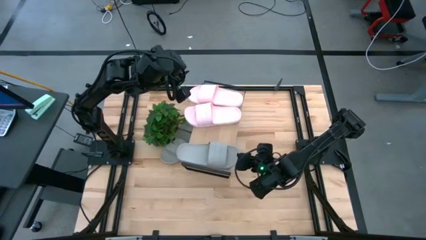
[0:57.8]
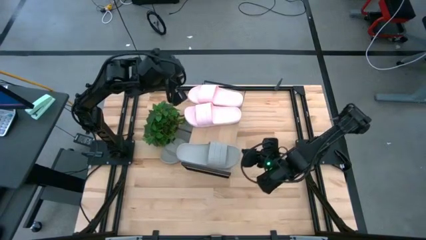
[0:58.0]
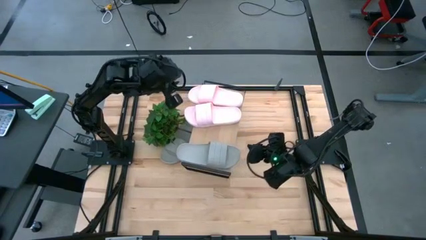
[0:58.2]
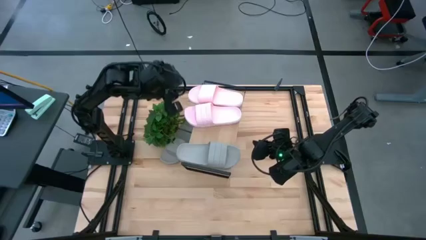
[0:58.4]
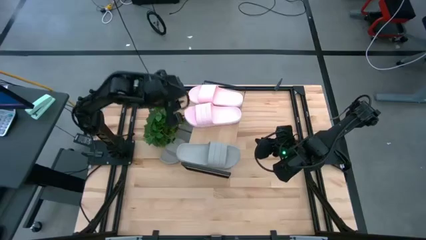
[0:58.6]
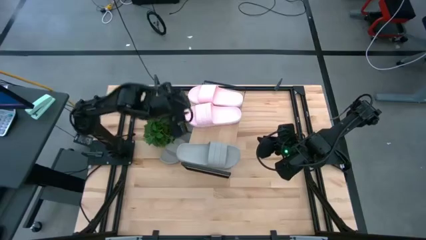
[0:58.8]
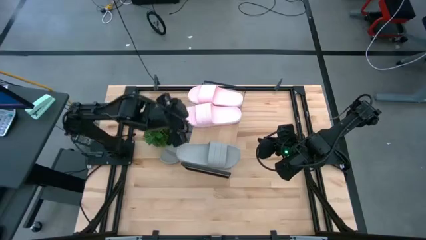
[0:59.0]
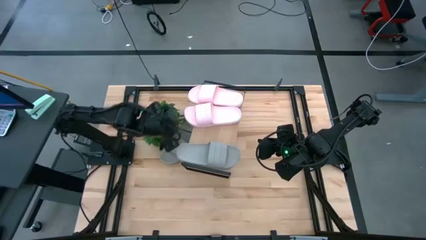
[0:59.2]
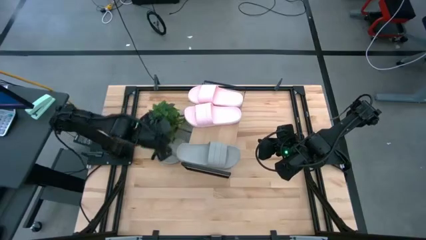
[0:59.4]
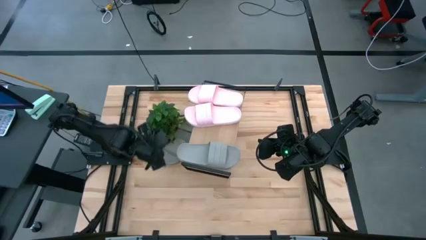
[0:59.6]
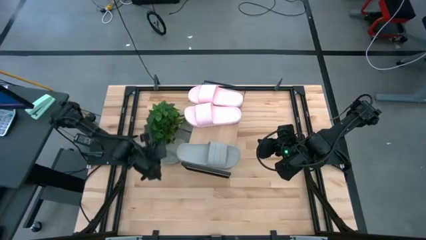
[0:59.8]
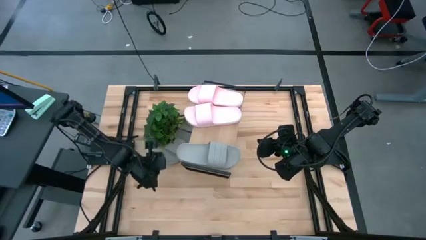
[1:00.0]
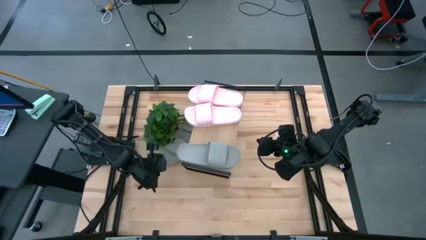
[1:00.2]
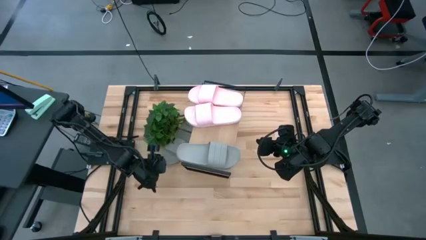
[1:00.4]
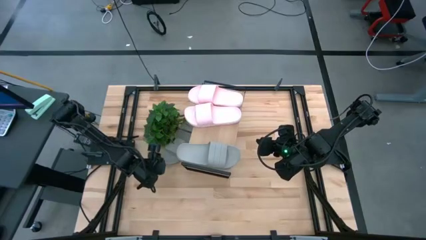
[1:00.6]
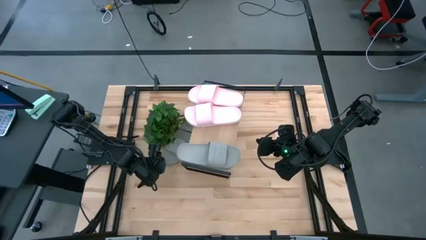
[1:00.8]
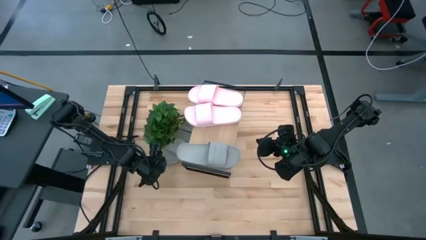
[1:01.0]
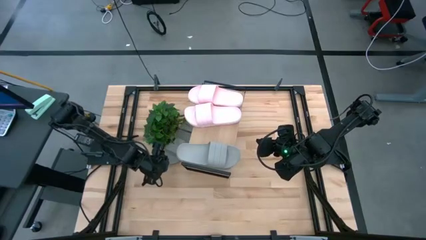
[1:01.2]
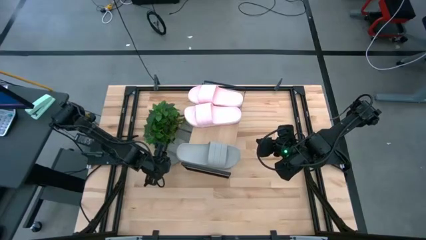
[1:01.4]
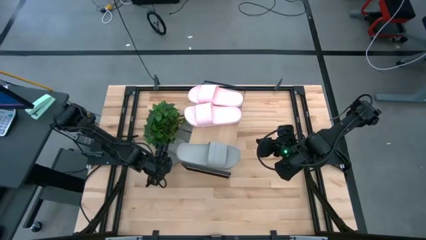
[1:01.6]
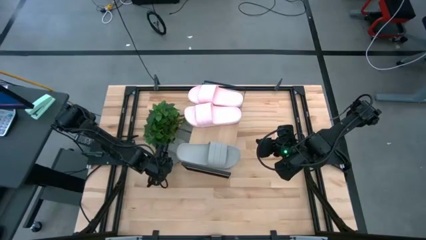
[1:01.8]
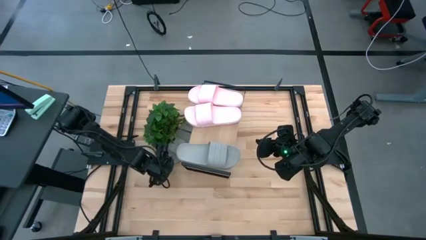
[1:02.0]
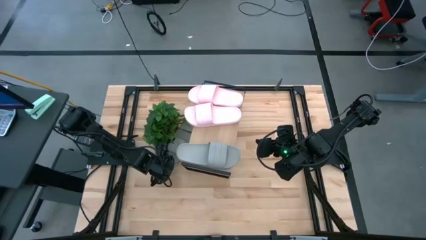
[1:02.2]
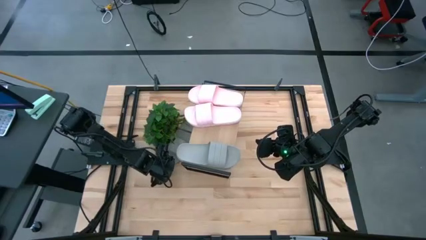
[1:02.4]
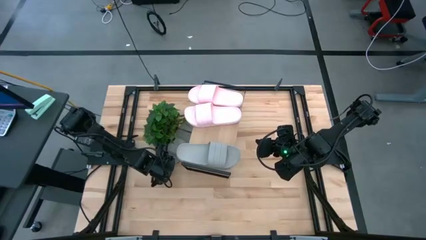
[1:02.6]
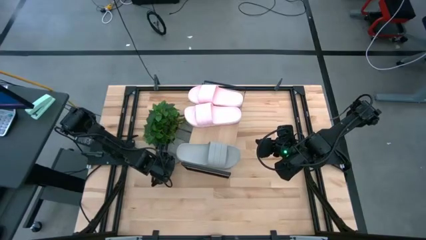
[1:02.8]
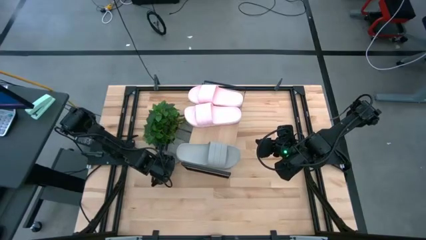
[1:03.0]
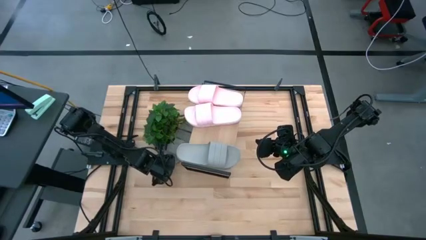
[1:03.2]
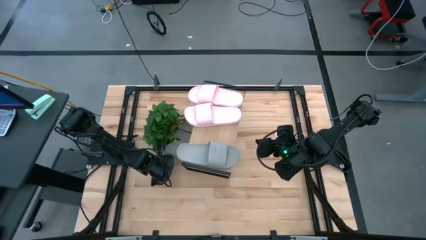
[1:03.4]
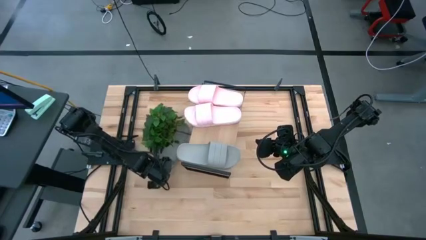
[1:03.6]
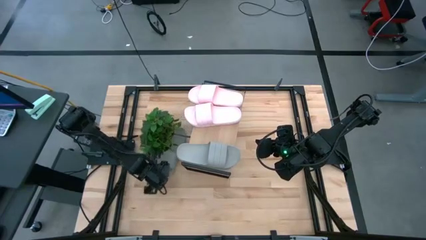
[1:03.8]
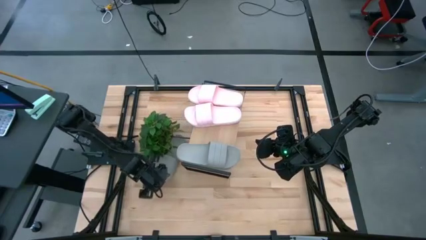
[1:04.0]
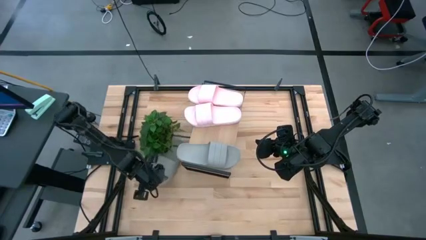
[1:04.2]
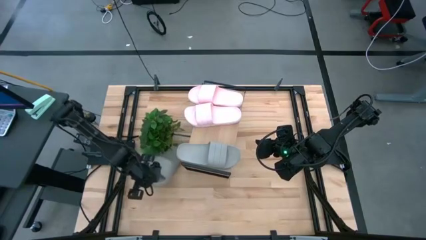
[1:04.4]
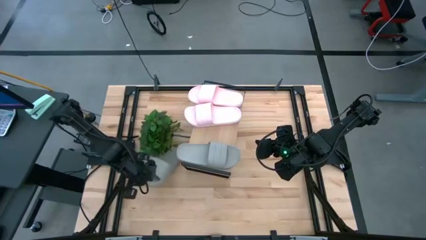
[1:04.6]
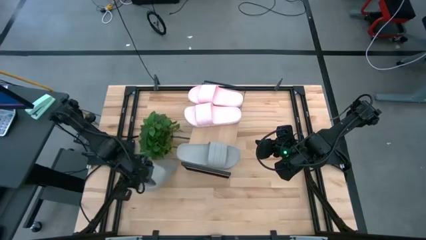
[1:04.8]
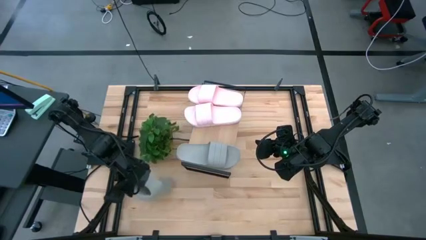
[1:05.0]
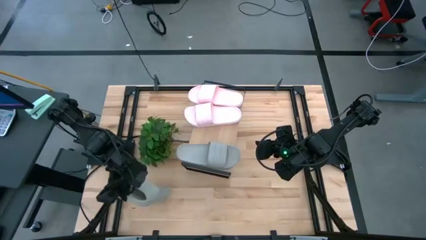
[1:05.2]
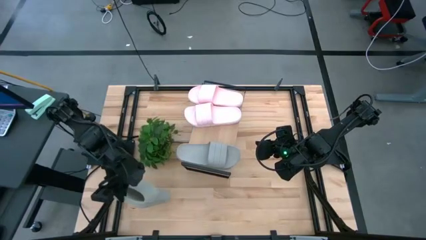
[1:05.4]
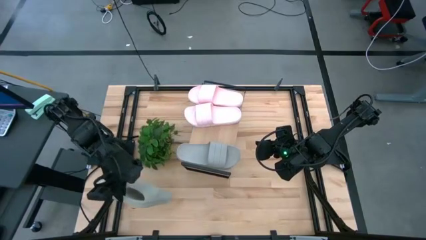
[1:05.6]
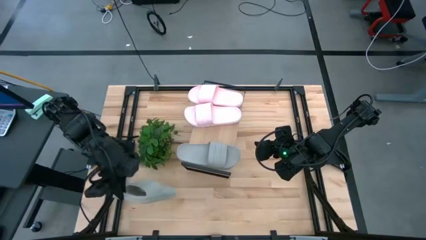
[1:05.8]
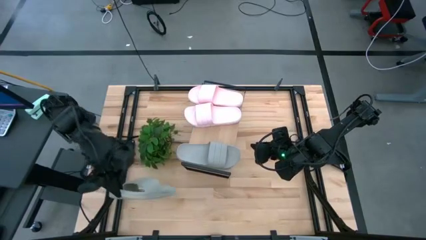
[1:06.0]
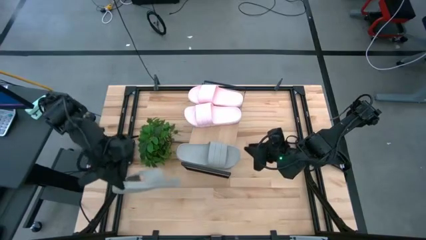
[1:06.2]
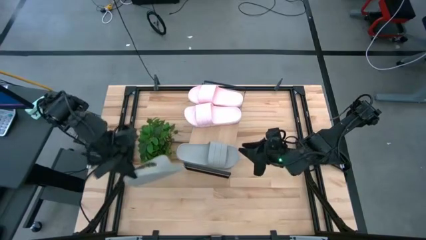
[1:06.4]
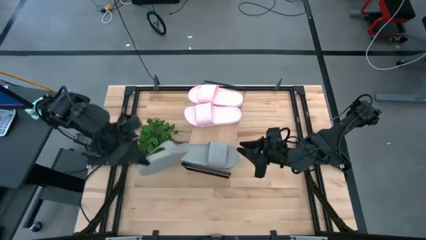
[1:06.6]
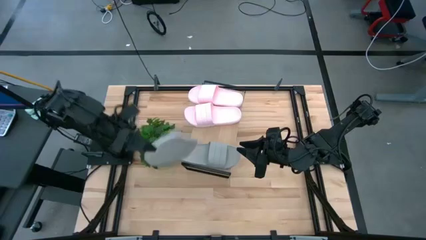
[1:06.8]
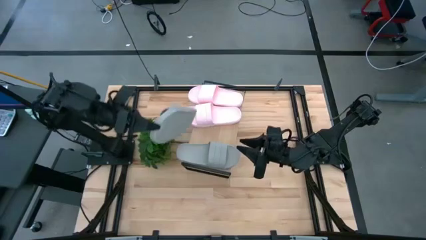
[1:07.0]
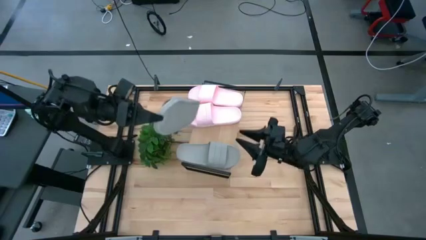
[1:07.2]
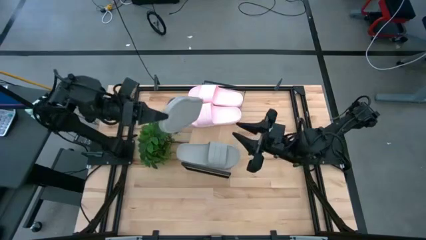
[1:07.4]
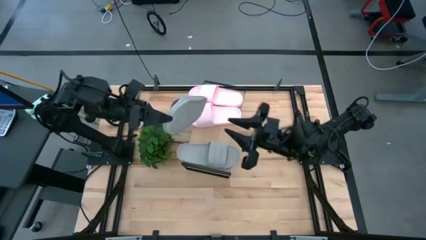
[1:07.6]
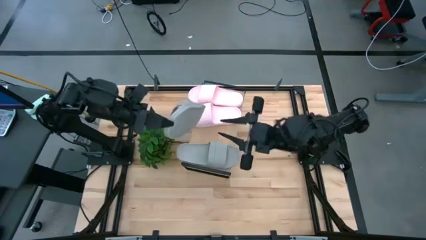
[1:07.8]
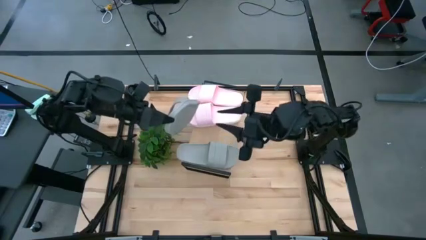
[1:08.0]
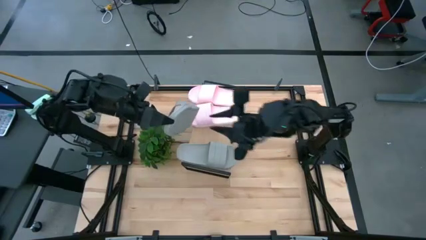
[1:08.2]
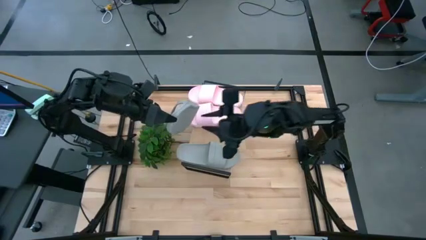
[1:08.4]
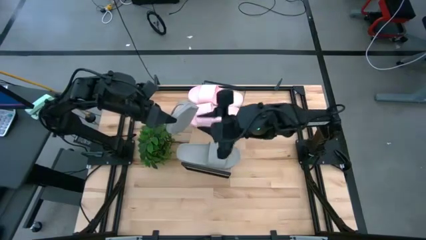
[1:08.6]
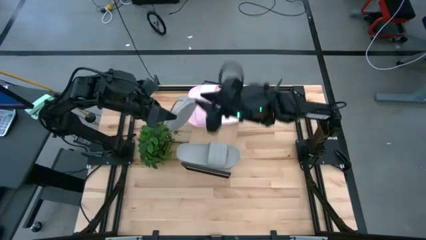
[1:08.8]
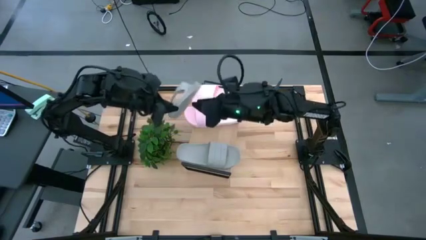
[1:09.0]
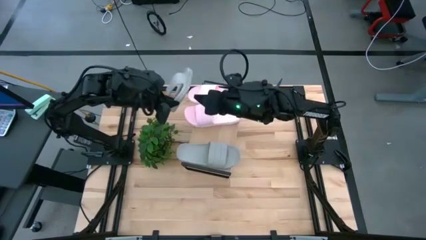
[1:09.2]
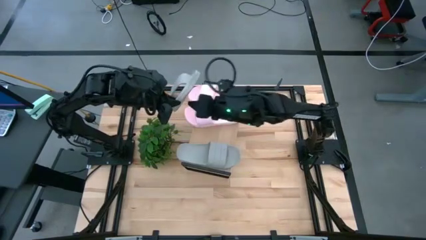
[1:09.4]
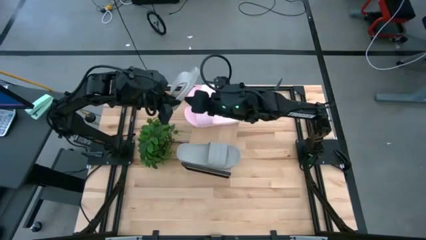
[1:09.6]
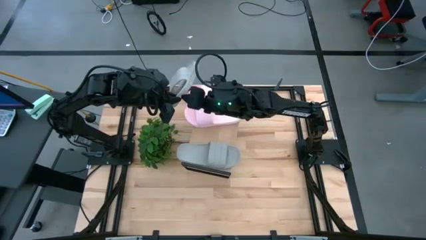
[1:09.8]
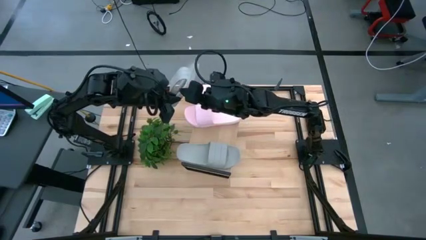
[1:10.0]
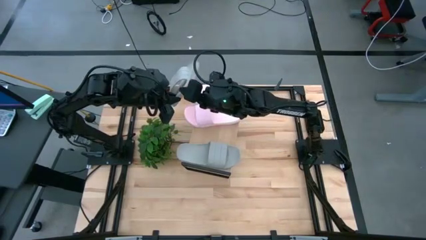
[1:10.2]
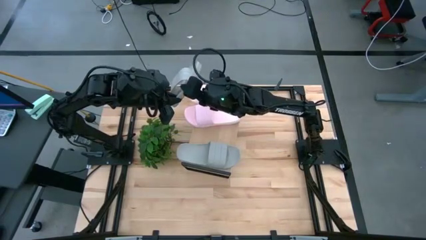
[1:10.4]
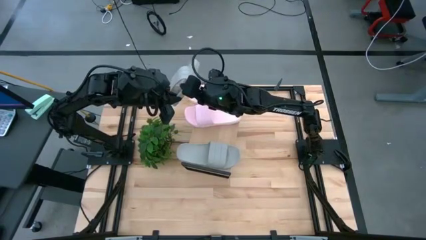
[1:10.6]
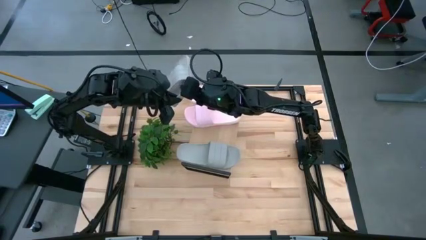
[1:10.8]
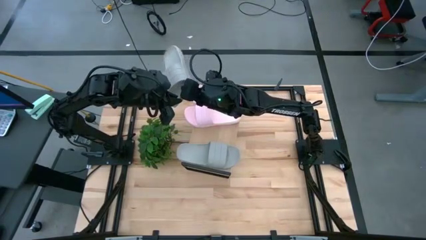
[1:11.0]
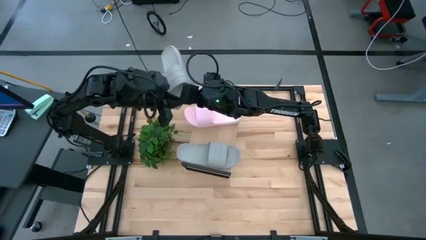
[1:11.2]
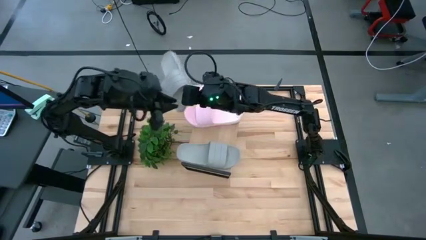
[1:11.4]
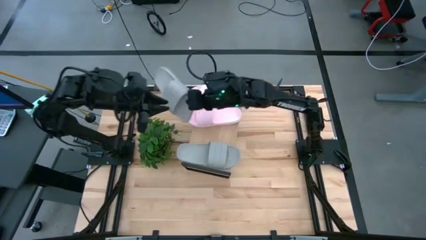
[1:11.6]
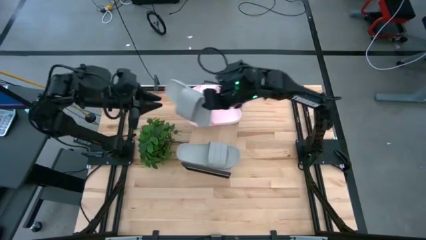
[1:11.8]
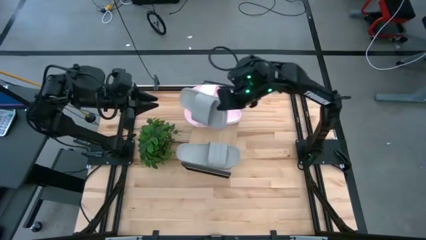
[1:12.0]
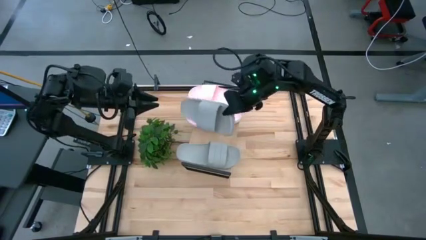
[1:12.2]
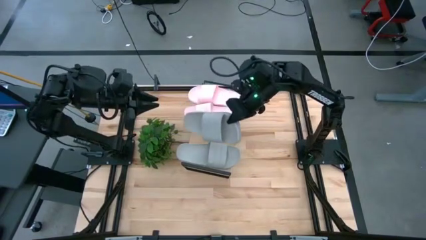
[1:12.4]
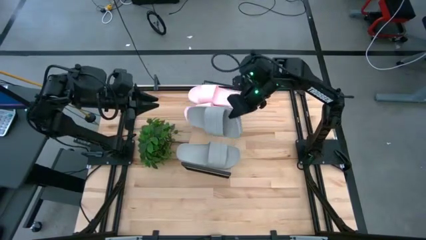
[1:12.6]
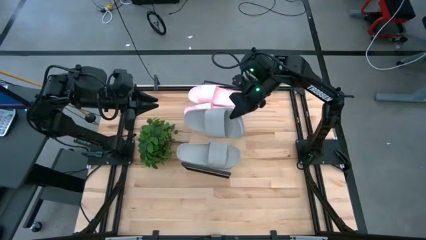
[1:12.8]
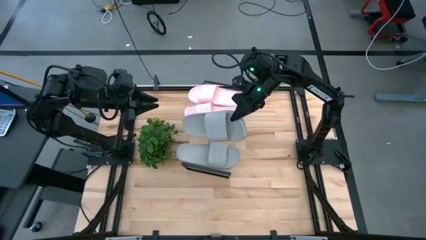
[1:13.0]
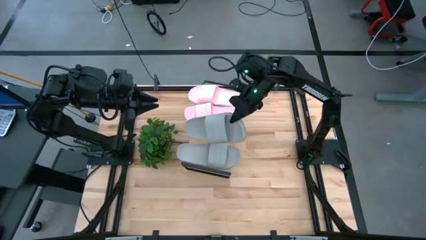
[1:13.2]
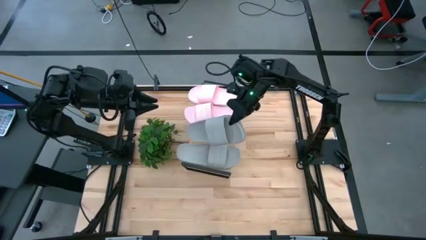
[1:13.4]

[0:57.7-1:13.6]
Task: Pick and place slides into the shelf
Put the gray slide on the shelf
